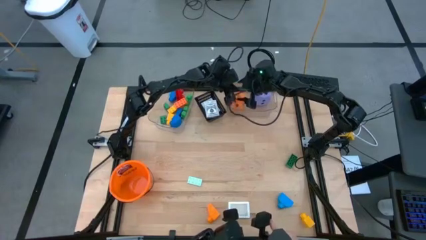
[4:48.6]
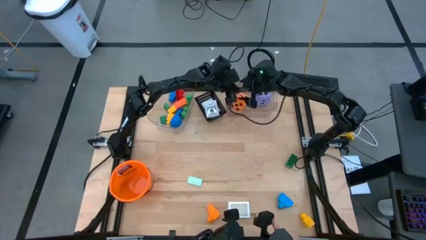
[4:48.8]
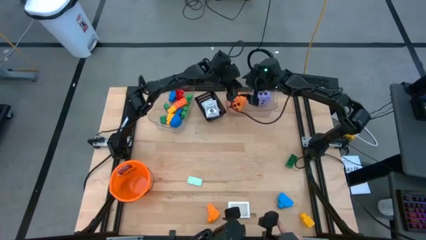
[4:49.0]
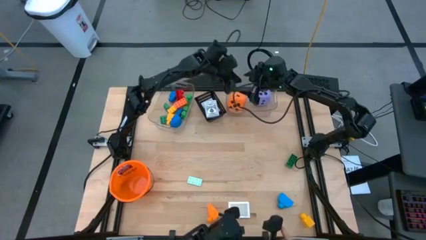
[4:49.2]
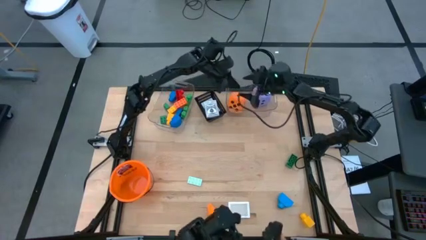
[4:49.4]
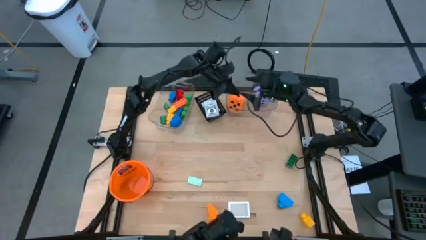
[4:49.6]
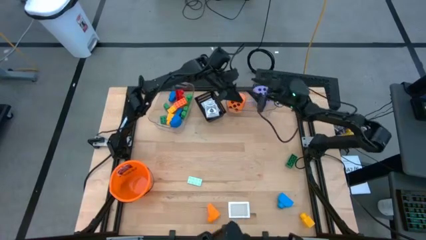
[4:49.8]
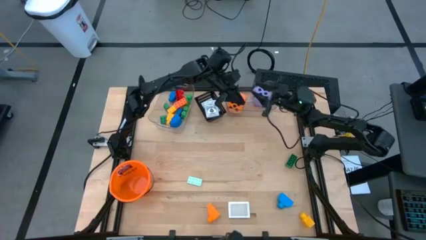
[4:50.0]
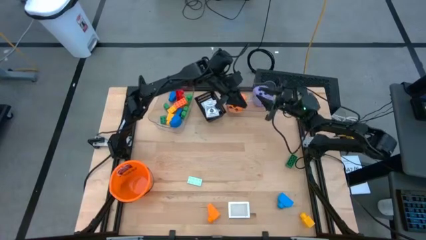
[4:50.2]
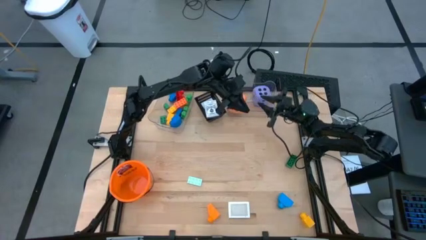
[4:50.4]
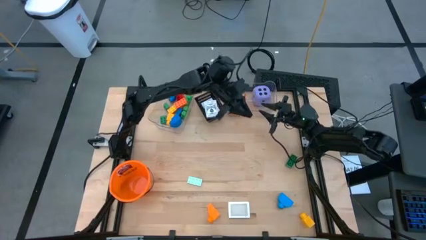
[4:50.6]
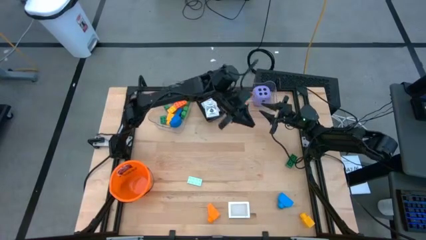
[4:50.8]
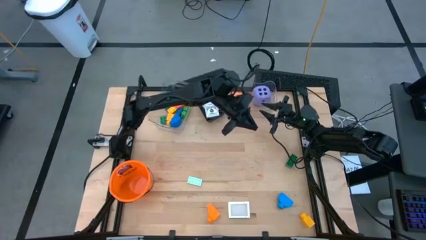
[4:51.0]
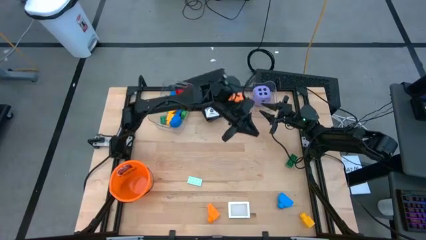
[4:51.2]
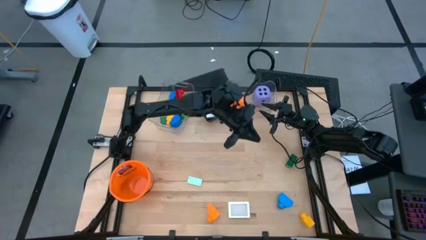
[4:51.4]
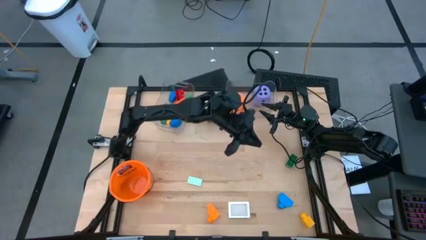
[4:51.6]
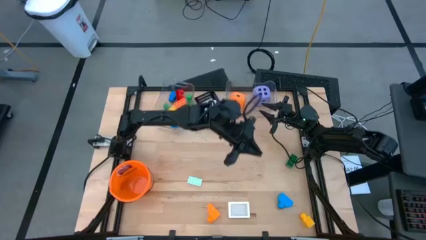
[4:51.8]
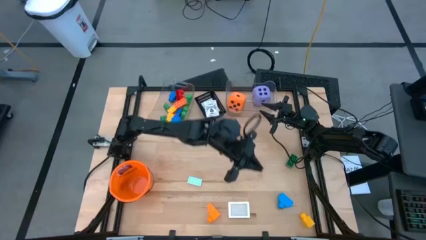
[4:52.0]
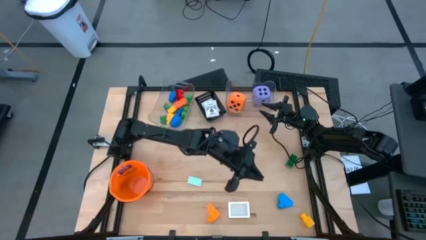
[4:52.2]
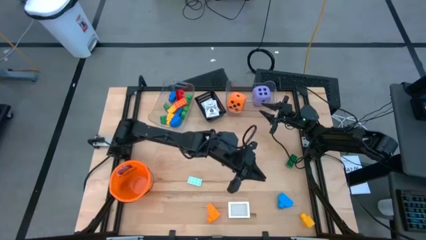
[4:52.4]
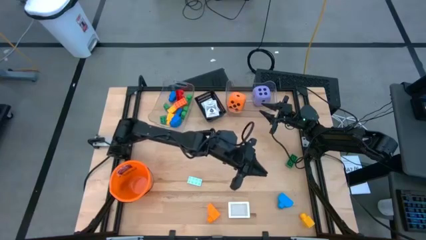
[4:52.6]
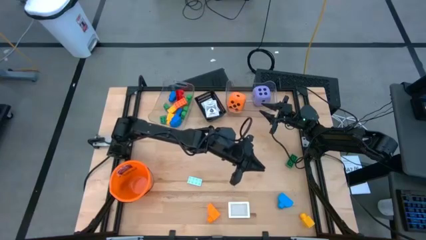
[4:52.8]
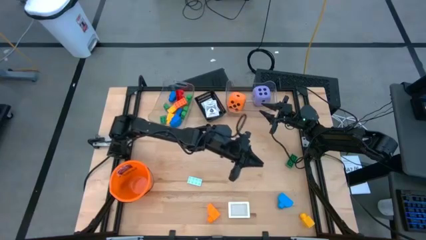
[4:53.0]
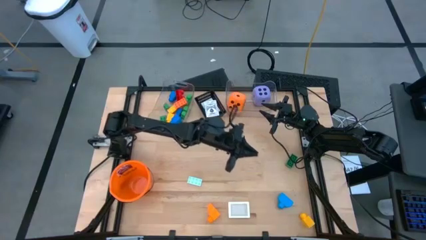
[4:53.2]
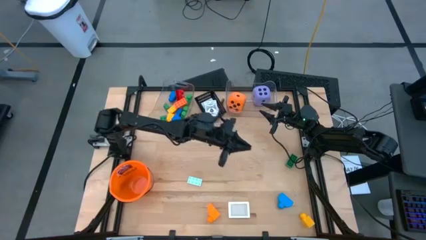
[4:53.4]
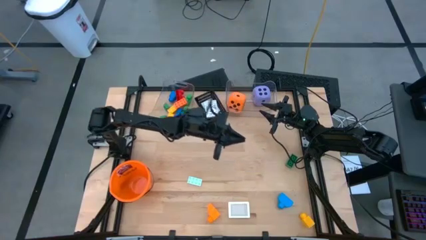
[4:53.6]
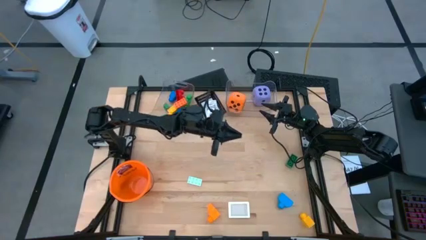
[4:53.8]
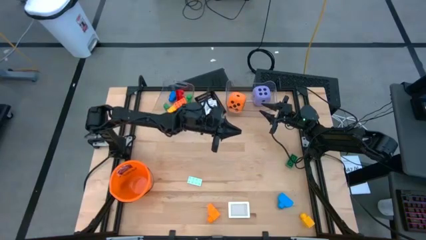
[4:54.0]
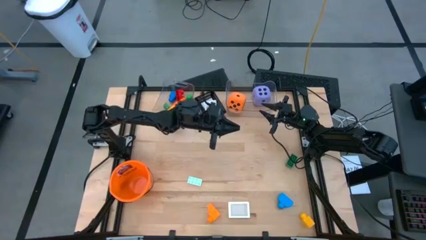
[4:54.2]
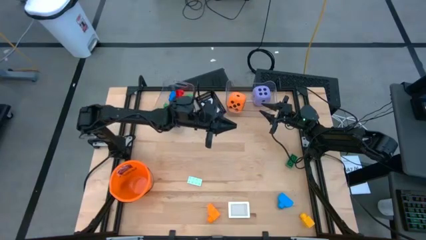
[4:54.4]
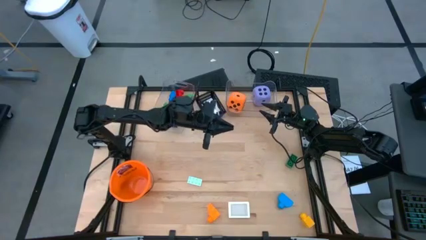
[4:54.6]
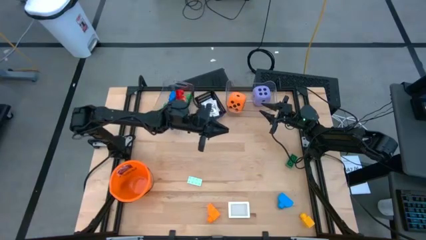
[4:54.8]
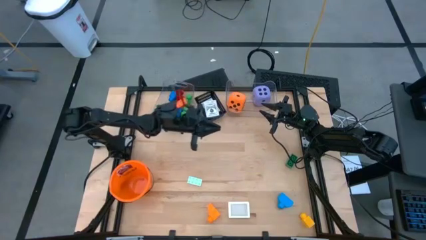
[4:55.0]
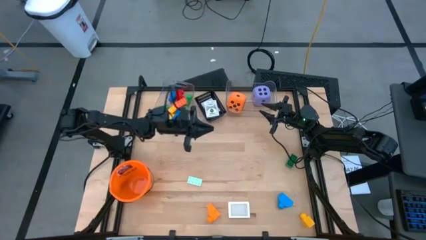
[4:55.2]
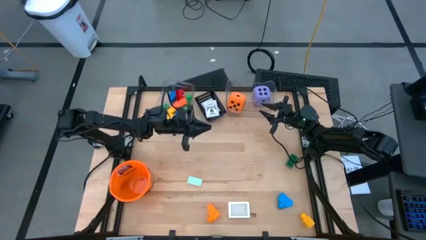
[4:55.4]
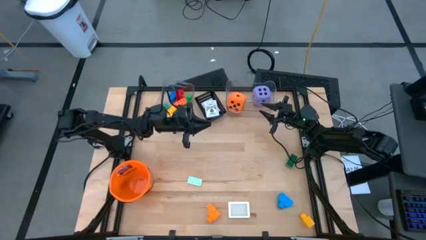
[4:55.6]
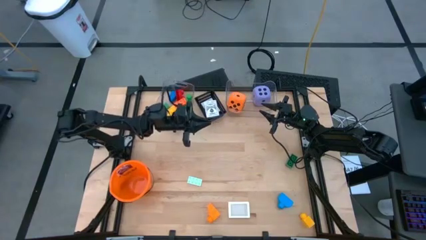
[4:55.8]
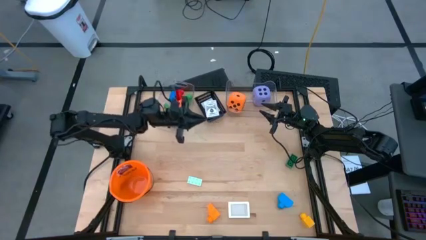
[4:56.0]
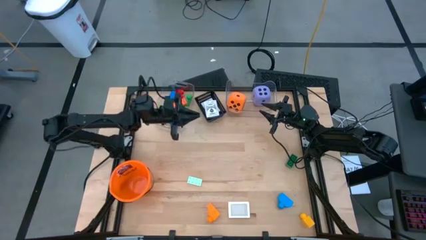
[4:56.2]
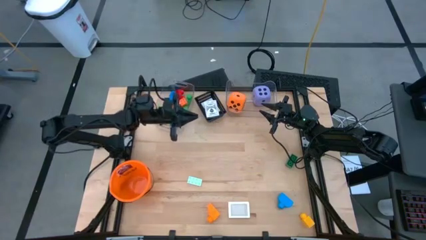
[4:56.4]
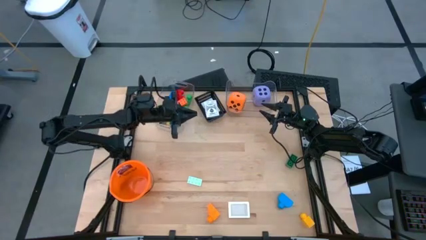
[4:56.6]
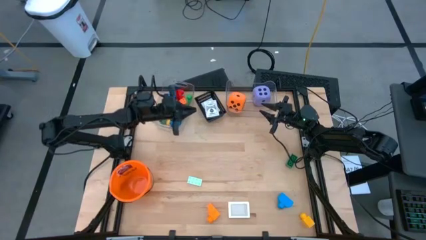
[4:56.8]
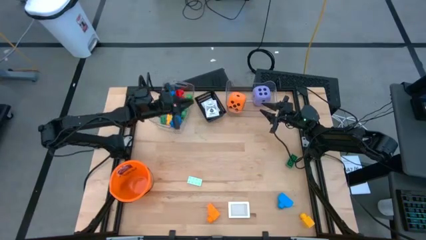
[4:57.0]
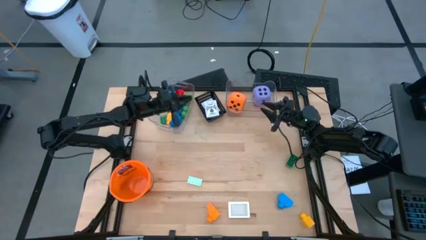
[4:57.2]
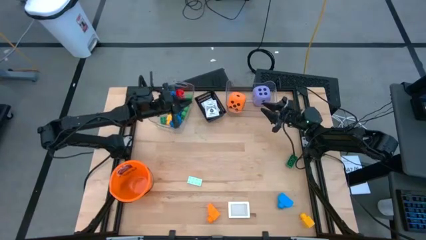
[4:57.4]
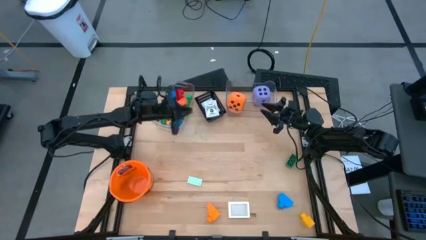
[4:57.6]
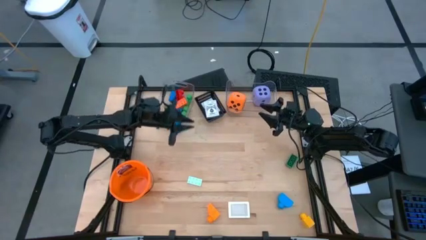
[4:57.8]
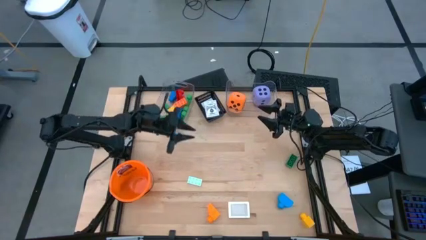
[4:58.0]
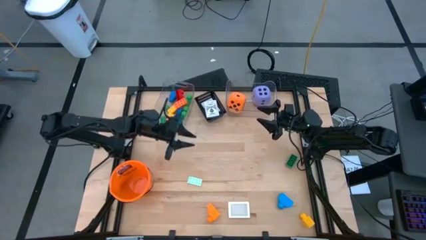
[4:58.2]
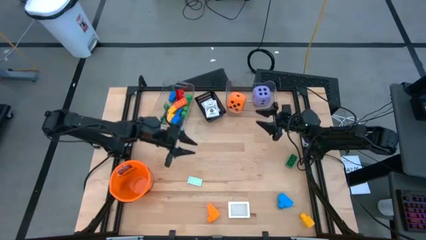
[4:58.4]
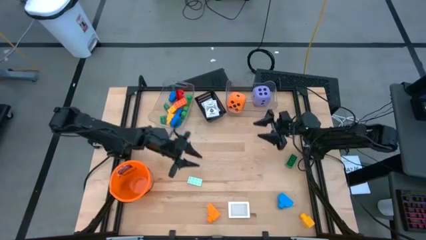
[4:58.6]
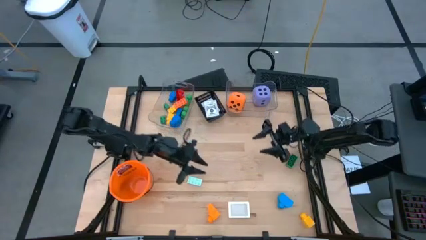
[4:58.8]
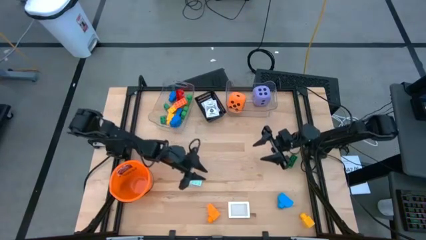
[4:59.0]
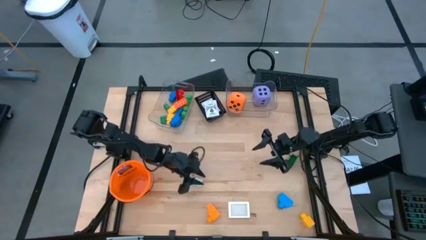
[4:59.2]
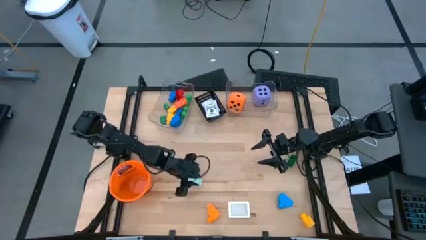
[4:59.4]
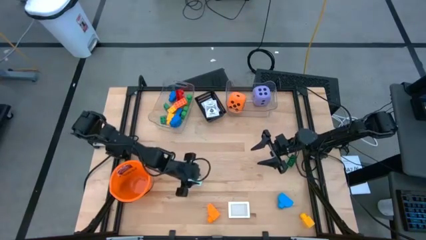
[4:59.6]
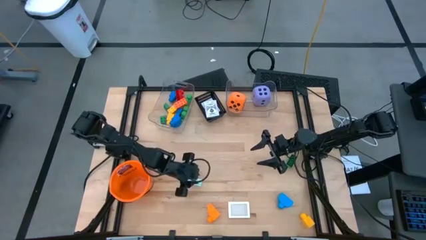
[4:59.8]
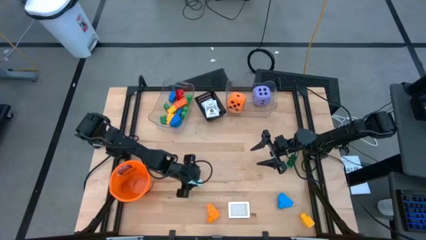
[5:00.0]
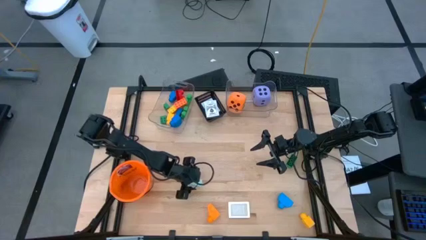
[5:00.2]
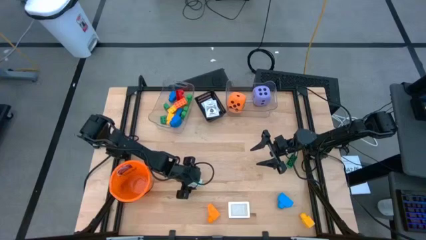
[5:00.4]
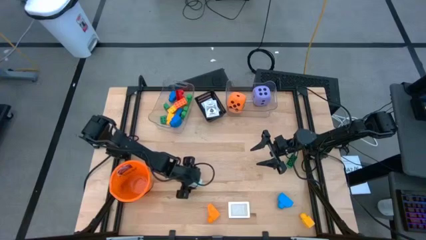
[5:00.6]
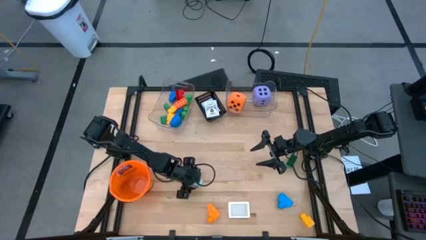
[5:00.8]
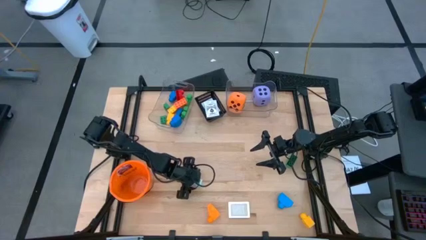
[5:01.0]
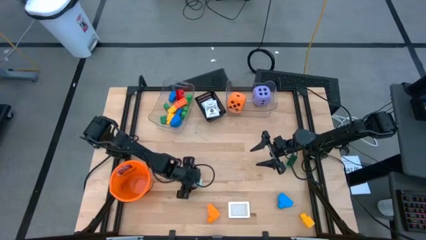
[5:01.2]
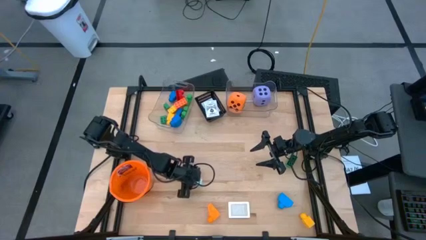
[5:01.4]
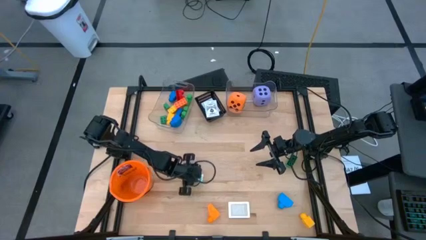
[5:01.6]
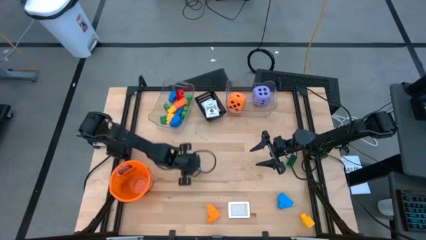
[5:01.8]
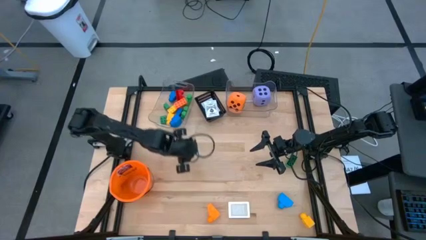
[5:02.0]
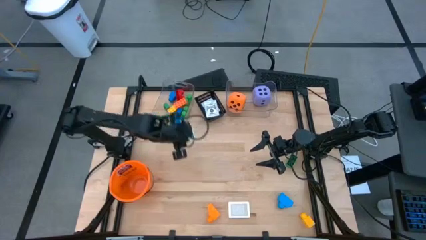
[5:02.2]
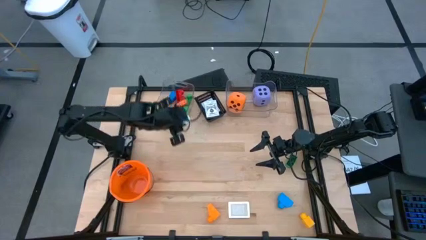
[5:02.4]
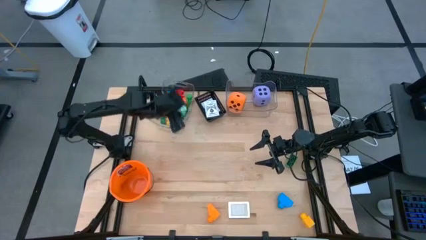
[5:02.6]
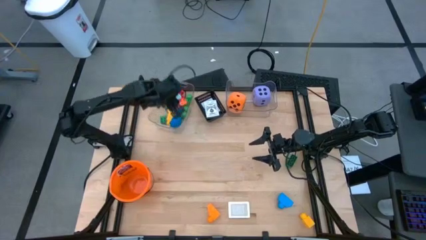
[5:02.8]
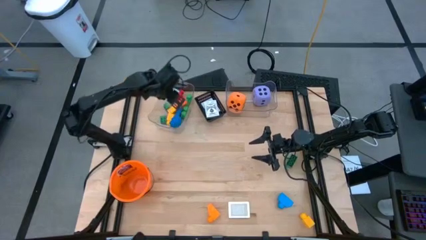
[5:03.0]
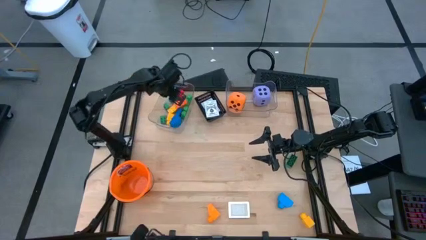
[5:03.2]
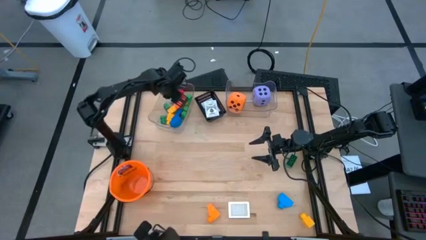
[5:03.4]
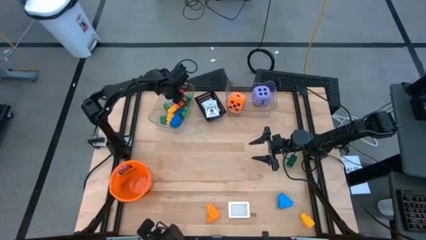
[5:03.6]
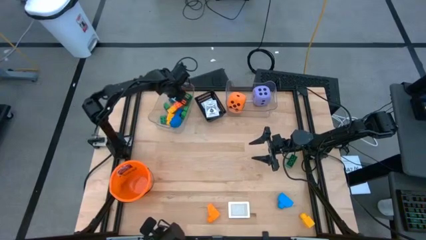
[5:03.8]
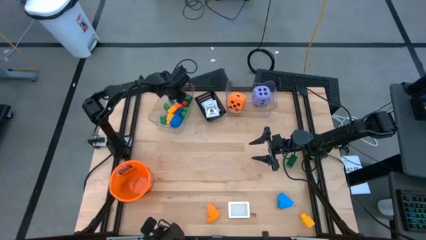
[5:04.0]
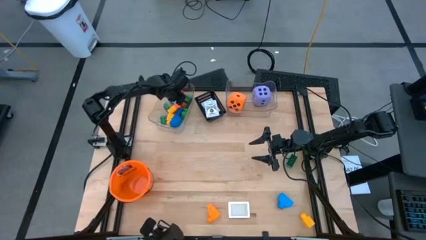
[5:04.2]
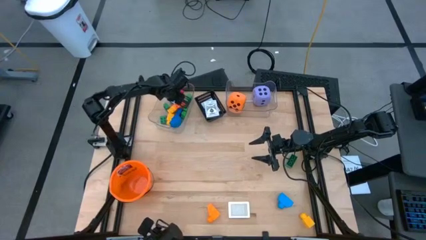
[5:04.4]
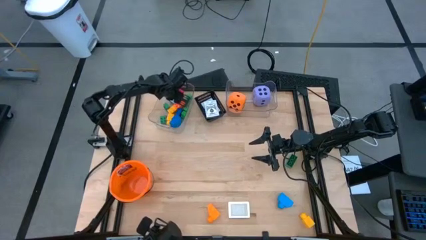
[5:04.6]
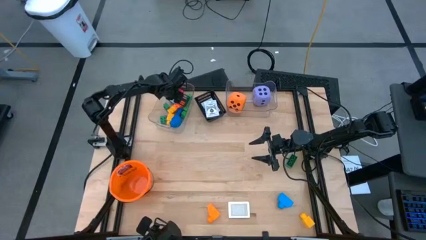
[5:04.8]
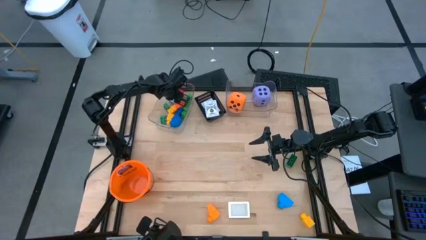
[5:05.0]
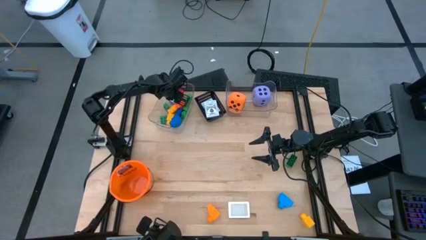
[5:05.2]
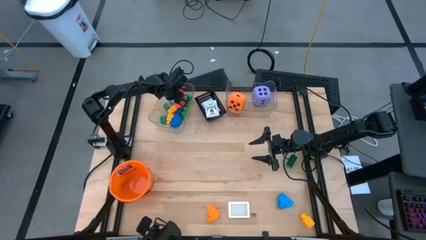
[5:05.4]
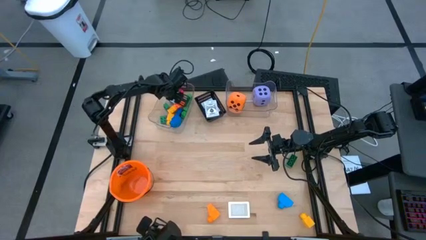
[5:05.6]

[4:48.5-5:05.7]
Task: Pick & Place Toys
Put the light blue gamepiece into the left transparent bin
